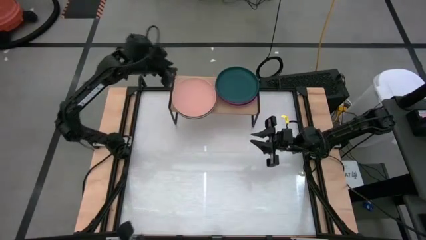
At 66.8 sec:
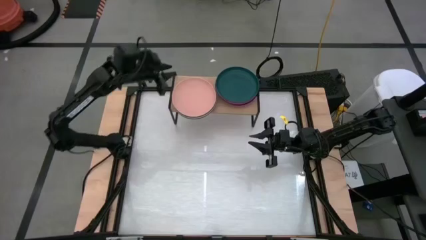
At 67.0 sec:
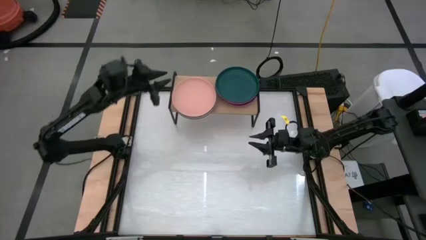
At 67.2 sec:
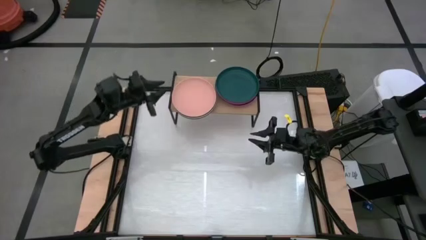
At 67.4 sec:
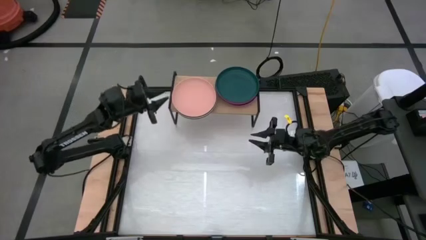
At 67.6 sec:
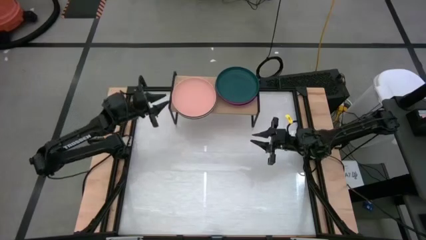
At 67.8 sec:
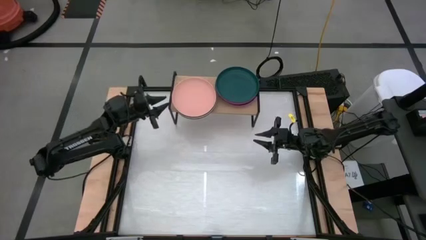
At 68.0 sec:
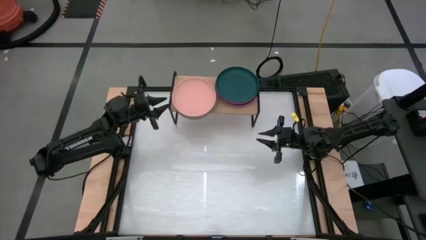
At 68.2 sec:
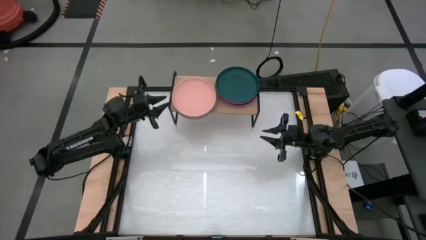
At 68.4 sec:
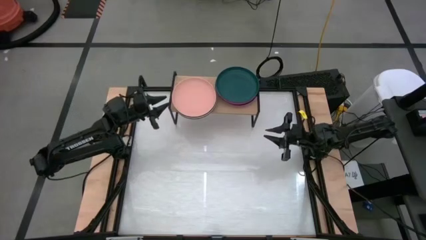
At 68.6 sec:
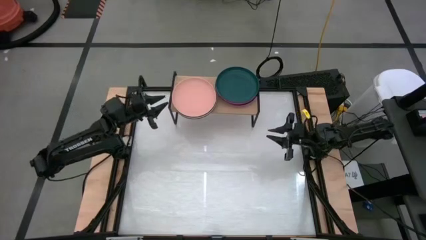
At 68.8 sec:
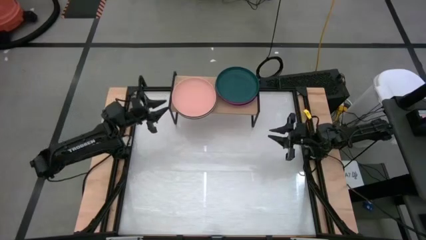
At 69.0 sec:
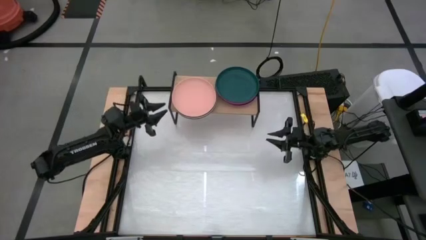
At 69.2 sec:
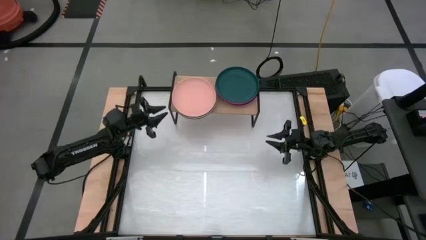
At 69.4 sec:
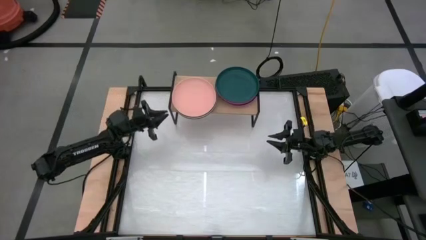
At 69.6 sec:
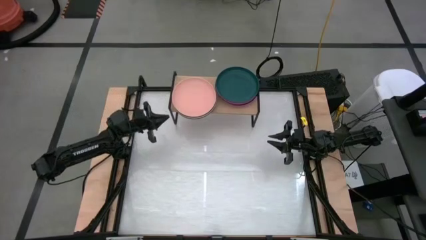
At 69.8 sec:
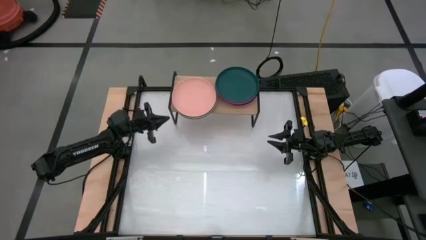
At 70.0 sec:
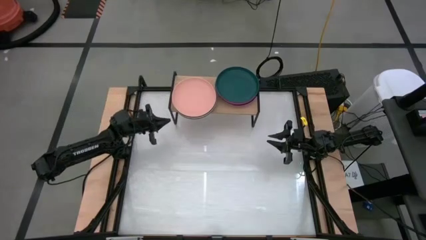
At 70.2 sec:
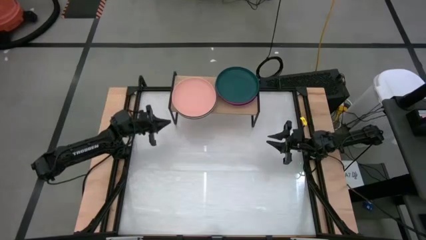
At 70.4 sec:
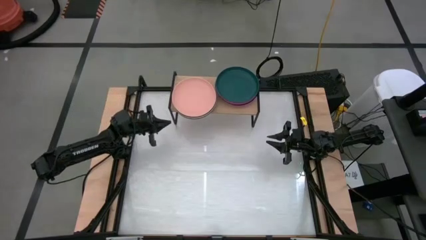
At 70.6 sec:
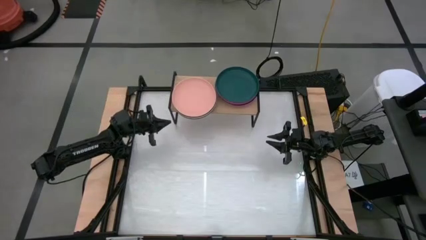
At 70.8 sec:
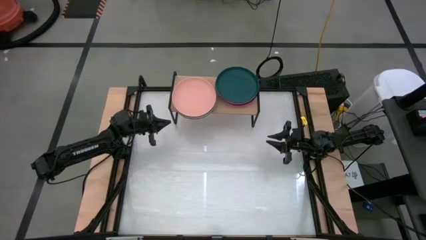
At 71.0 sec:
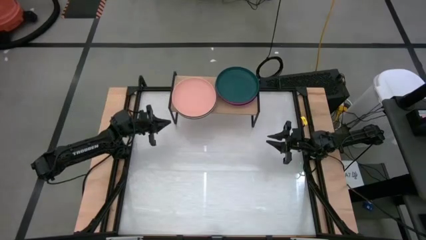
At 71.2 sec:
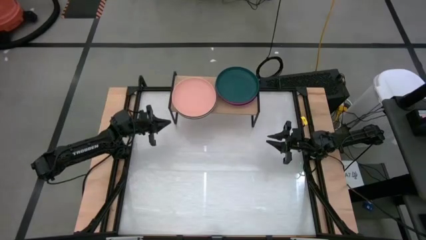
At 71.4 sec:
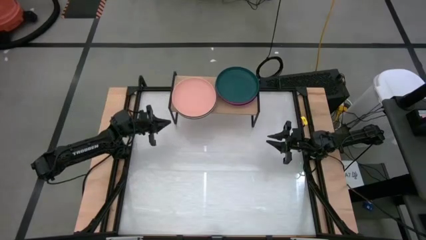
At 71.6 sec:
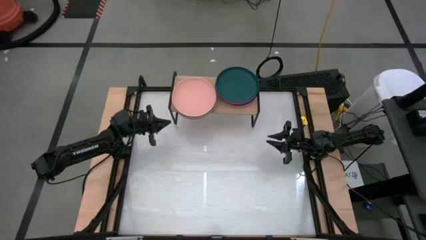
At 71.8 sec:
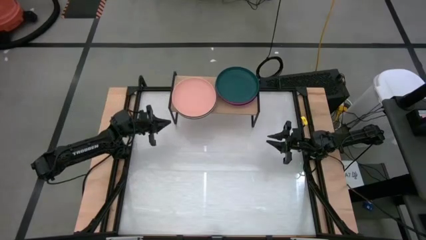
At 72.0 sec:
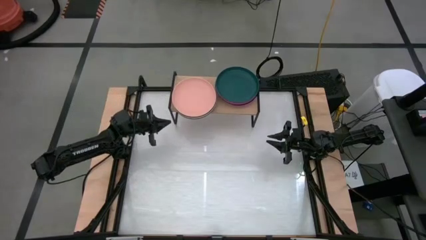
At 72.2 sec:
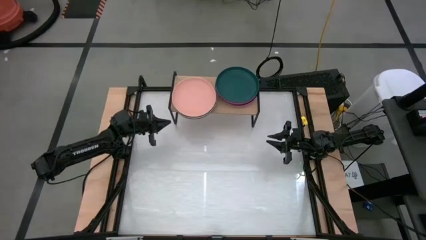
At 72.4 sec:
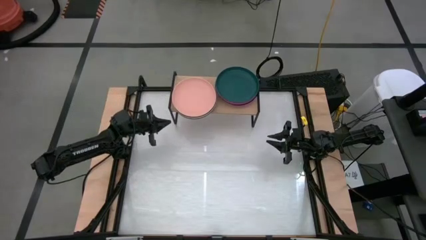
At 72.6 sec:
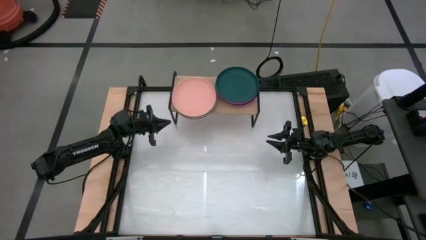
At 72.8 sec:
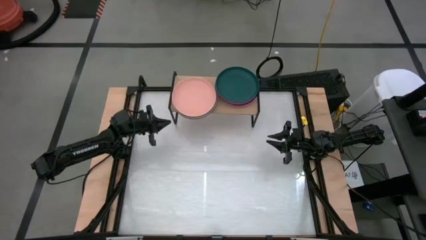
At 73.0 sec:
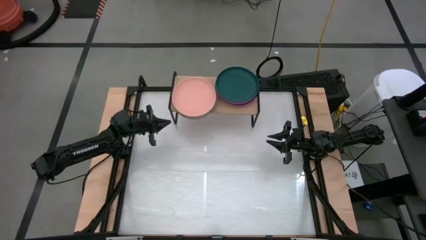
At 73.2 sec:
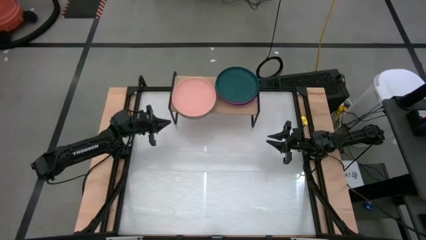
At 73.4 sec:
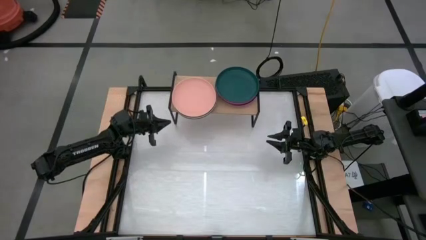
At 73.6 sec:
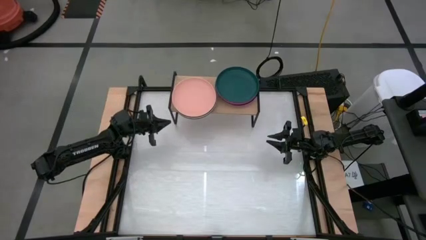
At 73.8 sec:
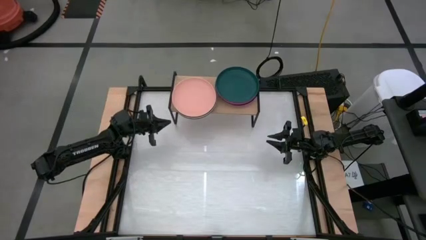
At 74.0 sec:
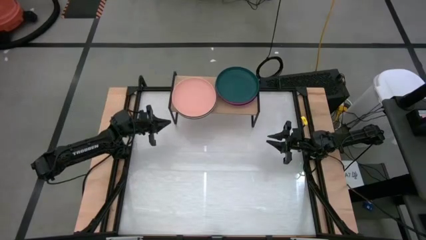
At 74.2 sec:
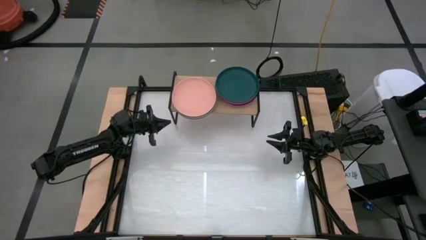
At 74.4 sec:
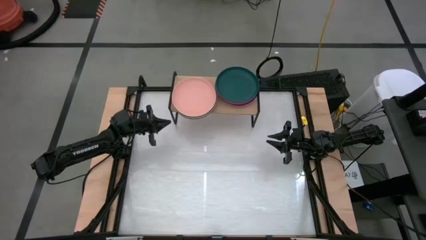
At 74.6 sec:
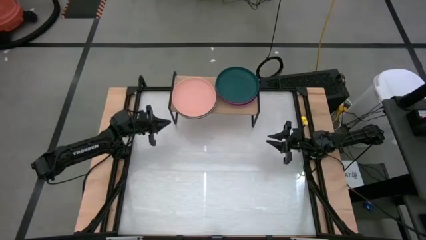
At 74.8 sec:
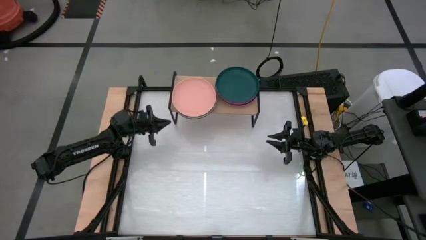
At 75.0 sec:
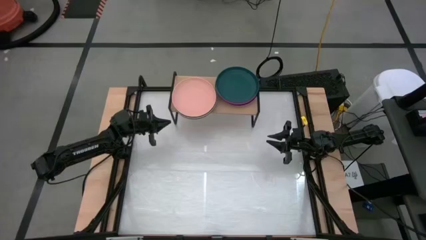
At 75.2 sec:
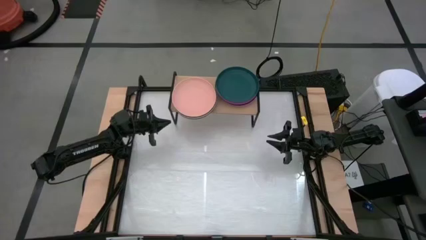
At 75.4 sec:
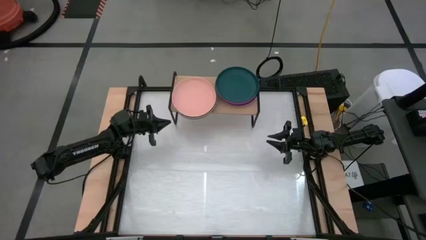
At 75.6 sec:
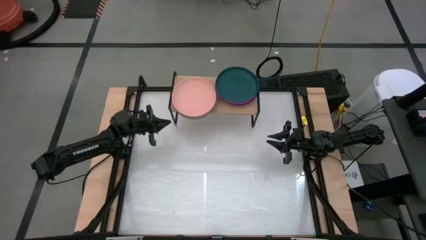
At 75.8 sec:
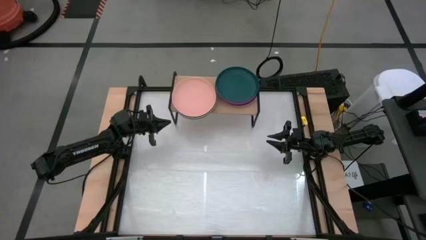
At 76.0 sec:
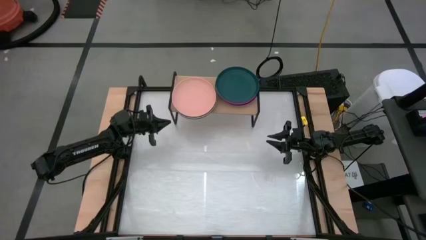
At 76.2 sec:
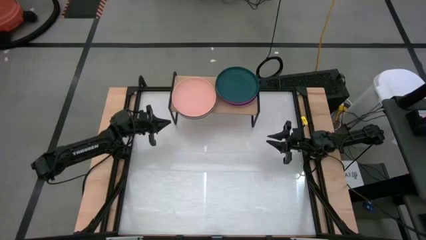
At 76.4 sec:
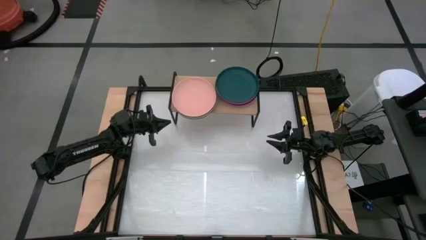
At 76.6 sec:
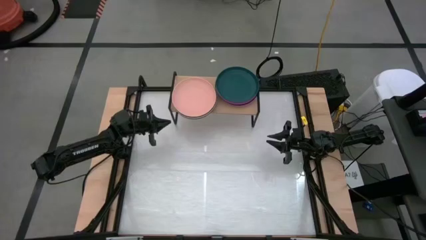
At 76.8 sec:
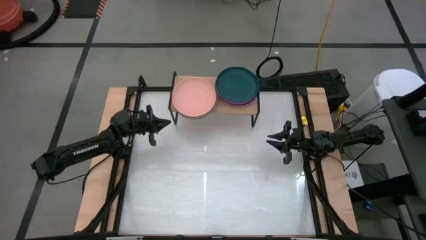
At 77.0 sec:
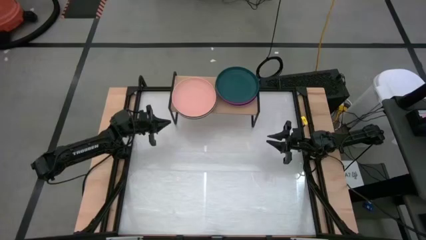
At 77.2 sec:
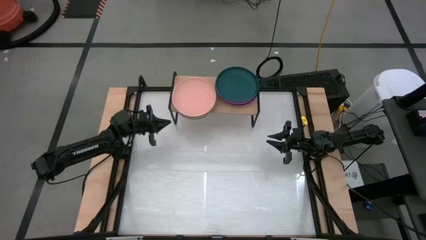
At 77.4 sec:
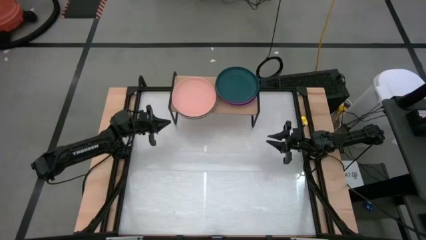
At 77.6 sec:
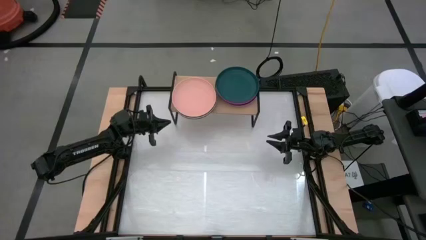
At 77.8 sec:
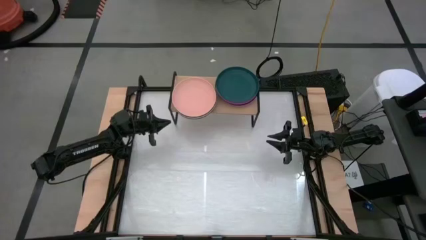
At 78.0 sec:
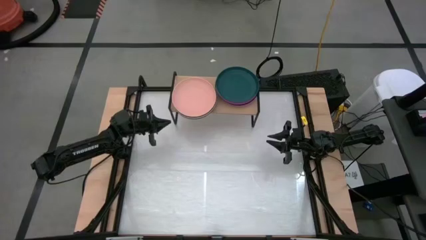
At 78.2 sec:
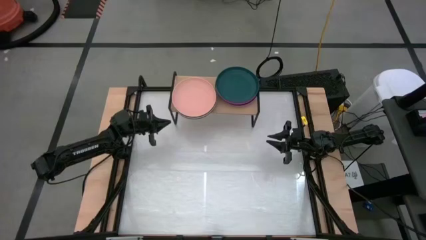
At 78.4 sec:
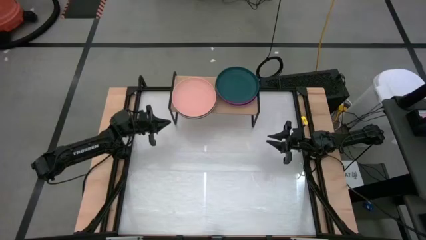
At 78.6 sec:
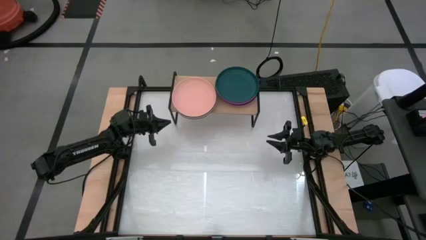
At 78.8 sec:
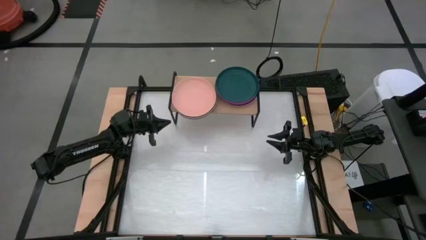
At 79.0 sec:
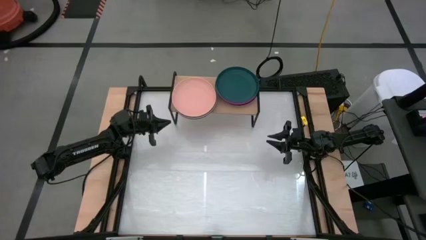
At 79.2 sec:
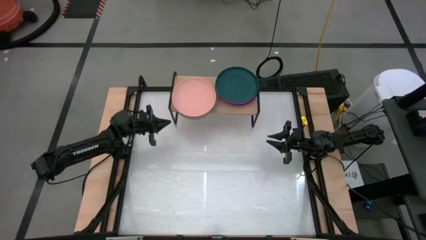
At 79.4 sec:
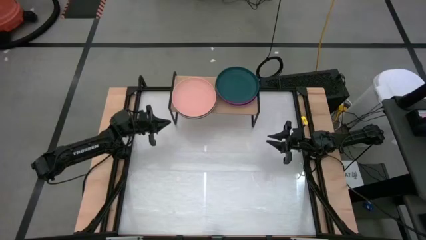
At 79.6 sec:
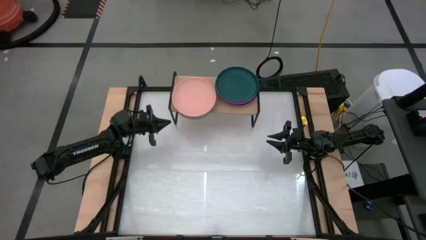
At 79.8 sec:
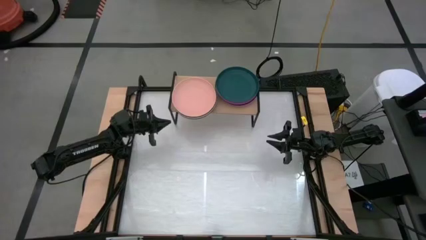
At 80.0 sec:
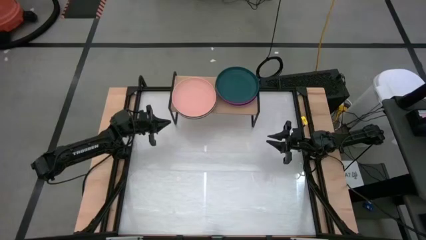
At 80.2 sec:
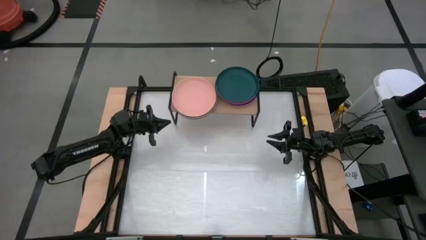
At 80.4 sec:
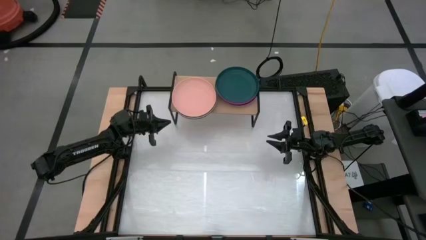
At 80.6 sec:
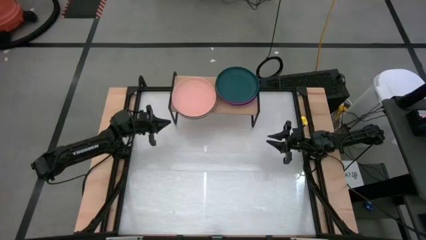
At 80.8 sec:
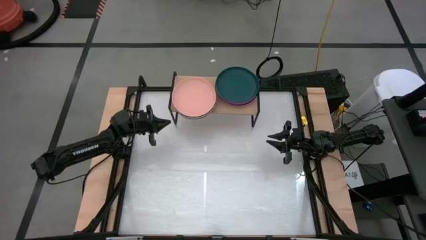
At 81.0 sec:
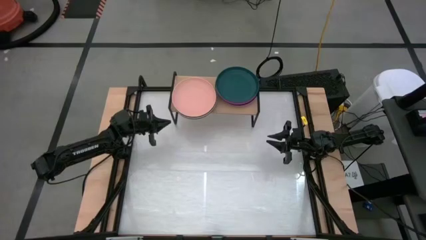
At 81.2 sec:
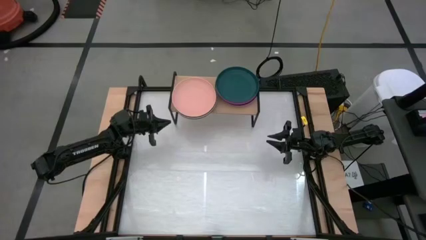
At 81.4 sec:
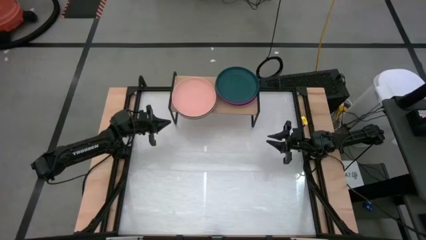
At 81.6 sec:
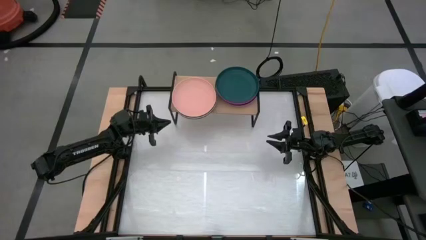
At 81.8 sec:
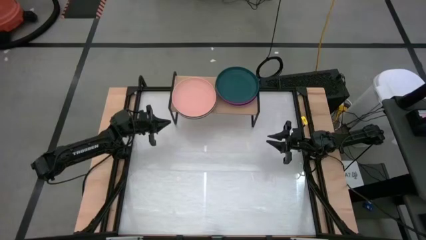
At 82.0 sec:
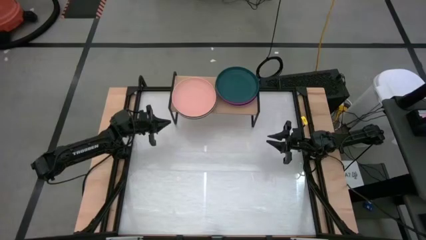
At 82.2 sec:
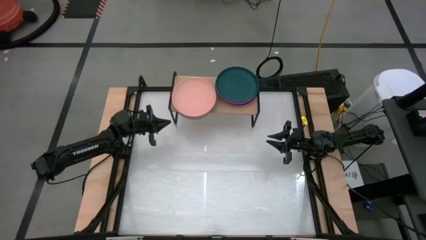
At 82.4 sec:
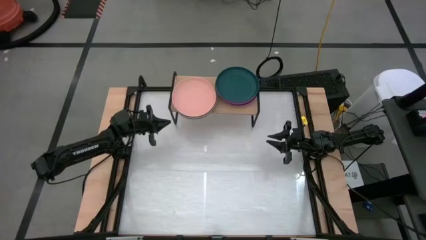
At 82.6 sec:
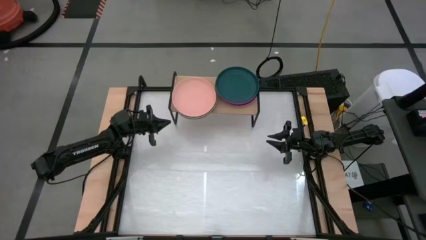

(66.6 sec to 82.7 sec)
Task: Place and stack plates onto a shelf
Return to Home Position
